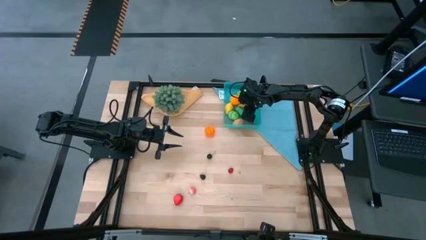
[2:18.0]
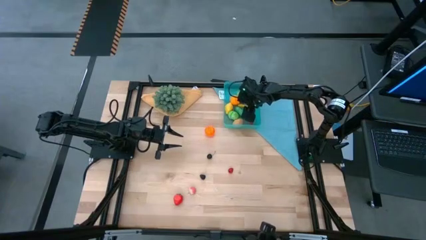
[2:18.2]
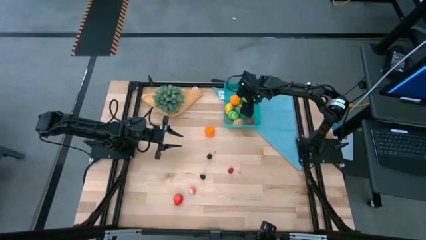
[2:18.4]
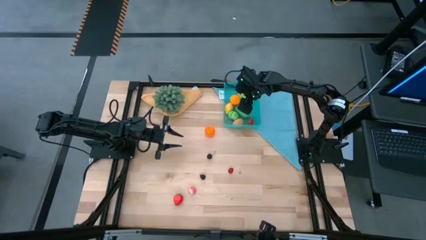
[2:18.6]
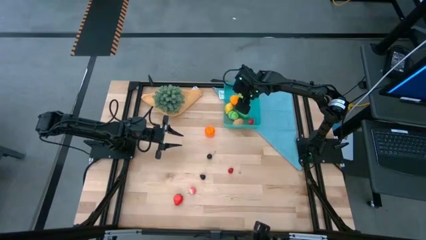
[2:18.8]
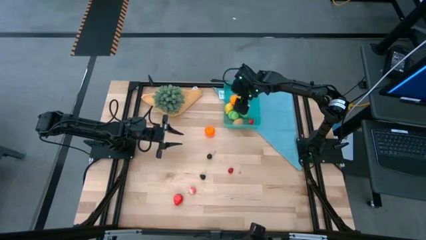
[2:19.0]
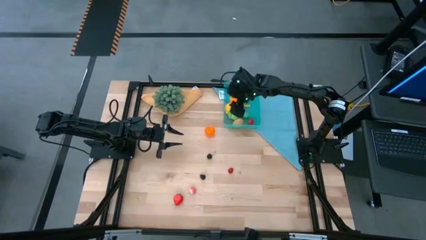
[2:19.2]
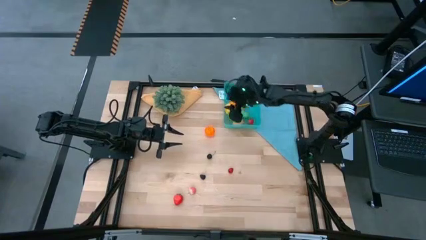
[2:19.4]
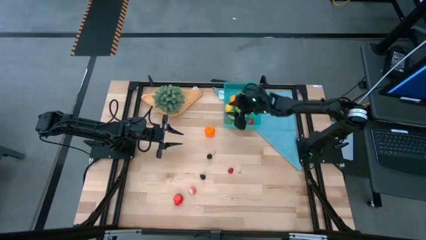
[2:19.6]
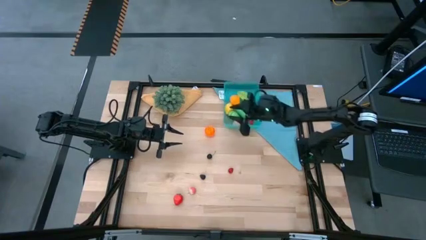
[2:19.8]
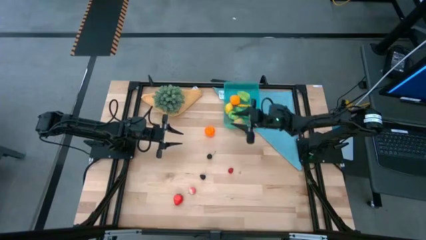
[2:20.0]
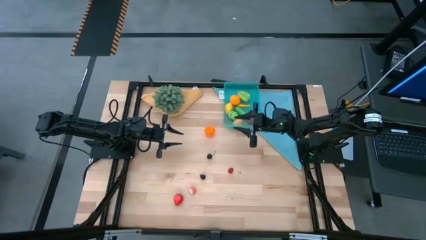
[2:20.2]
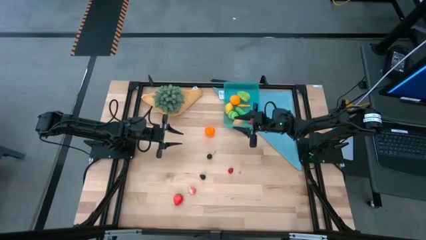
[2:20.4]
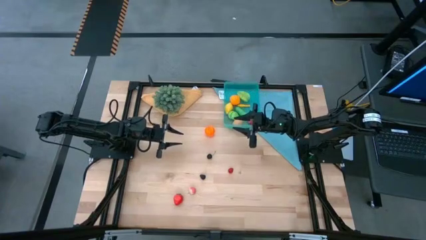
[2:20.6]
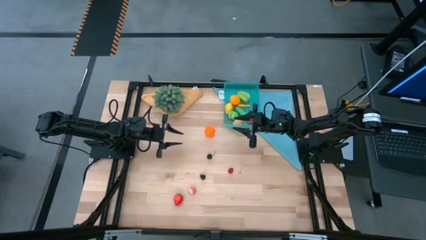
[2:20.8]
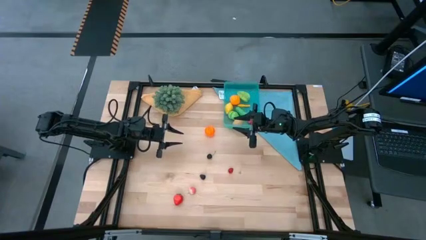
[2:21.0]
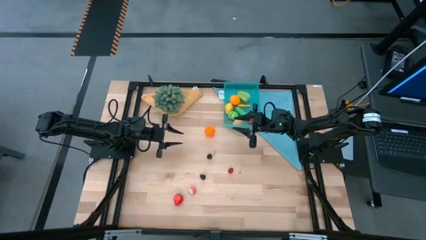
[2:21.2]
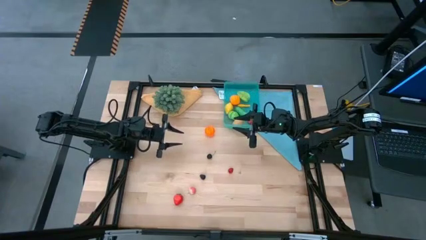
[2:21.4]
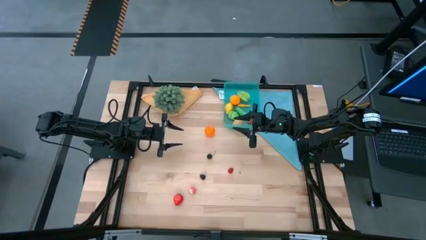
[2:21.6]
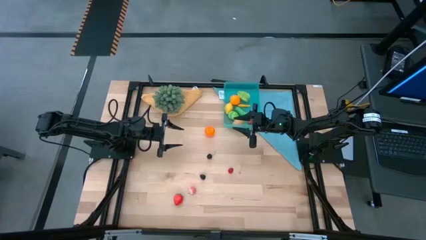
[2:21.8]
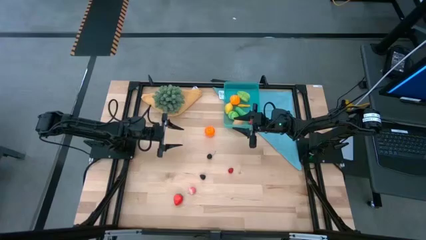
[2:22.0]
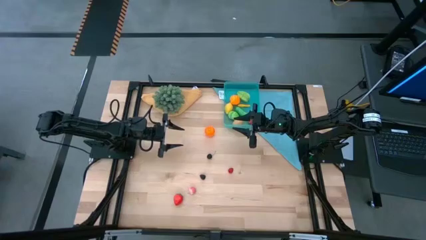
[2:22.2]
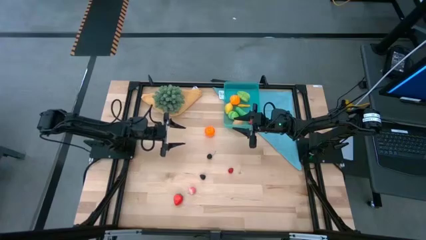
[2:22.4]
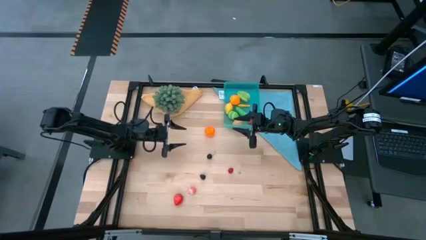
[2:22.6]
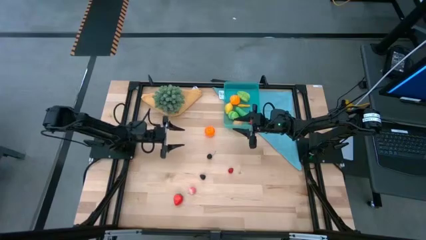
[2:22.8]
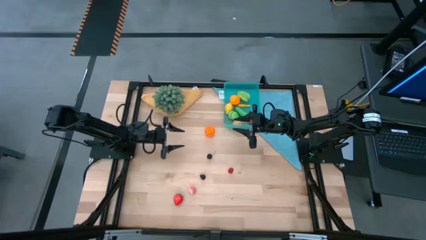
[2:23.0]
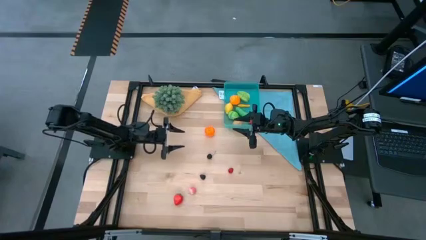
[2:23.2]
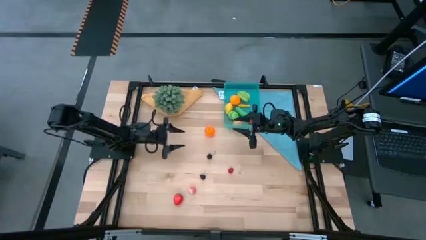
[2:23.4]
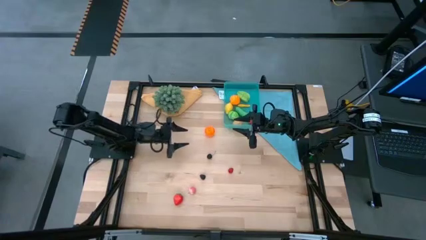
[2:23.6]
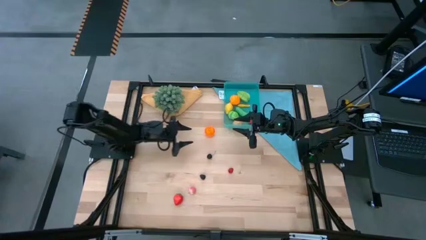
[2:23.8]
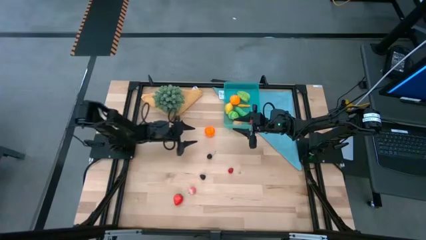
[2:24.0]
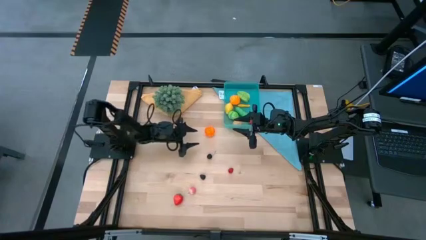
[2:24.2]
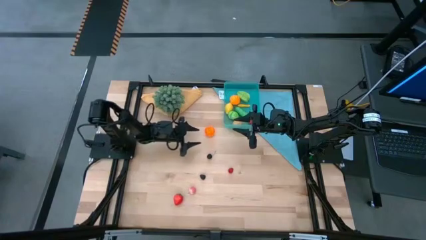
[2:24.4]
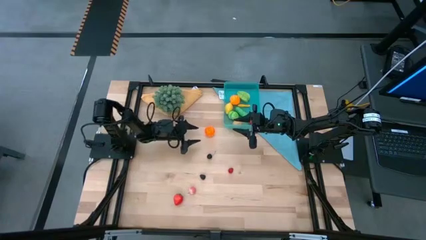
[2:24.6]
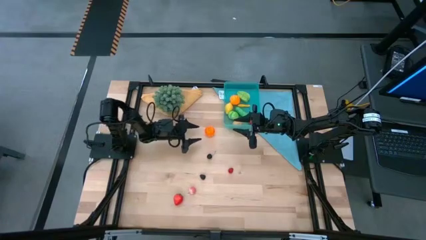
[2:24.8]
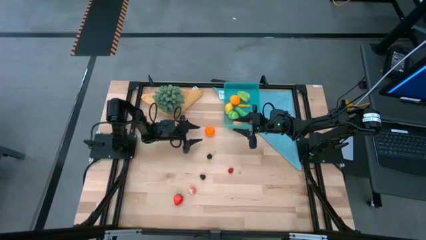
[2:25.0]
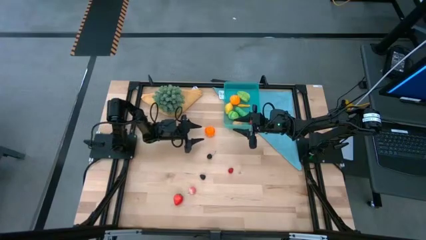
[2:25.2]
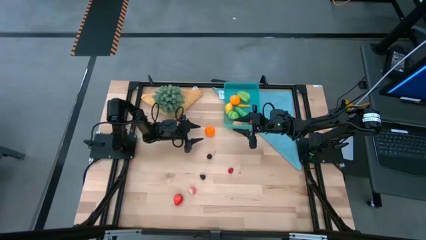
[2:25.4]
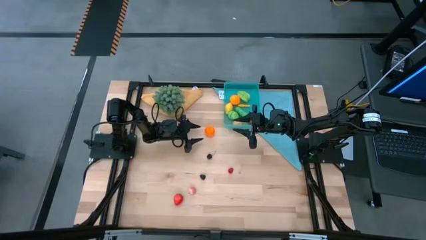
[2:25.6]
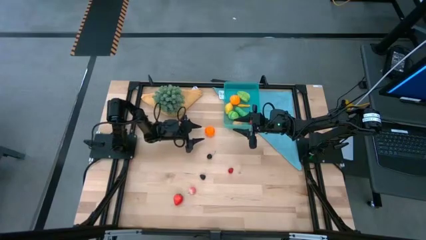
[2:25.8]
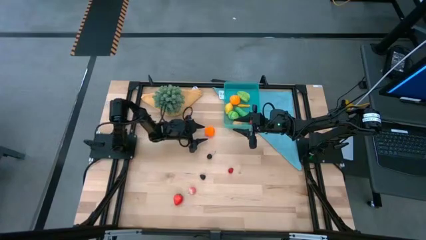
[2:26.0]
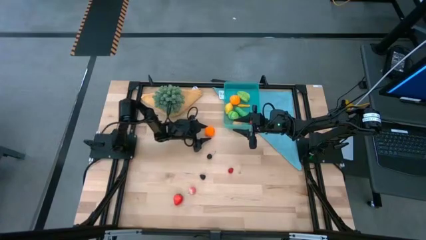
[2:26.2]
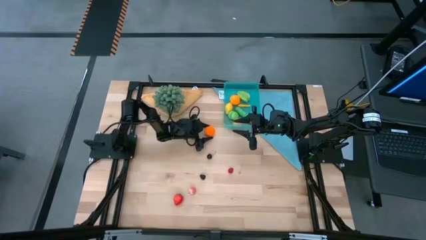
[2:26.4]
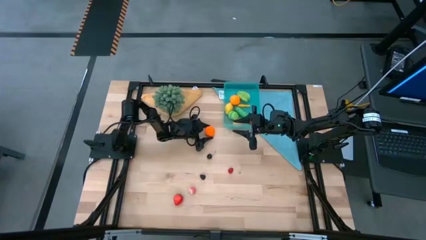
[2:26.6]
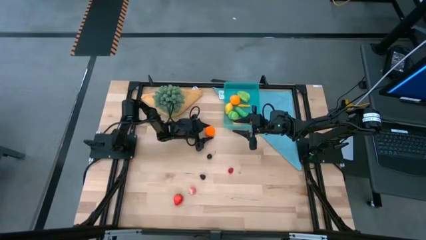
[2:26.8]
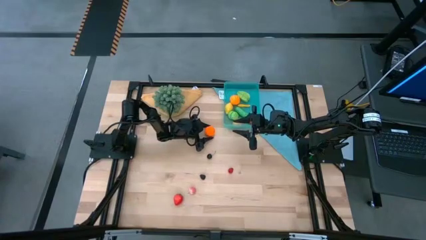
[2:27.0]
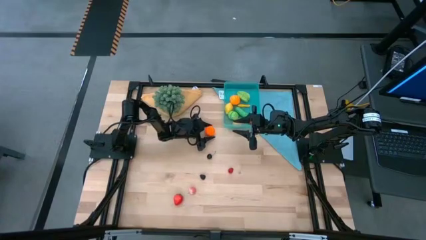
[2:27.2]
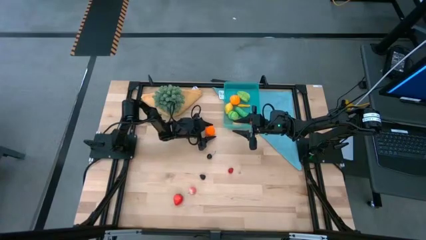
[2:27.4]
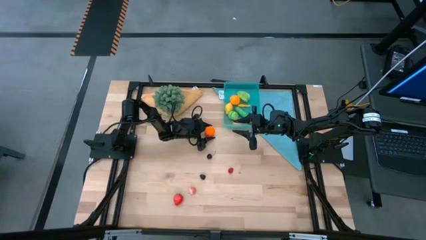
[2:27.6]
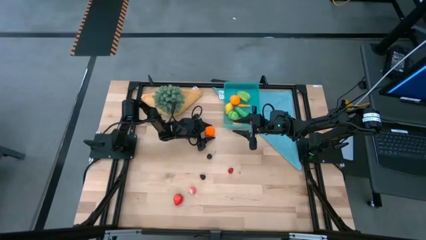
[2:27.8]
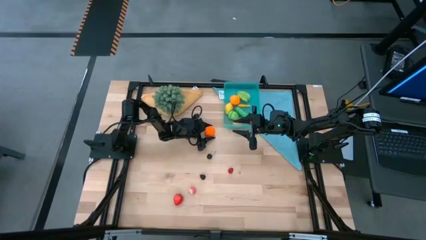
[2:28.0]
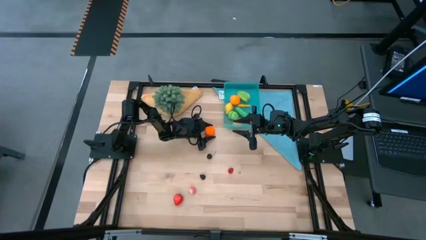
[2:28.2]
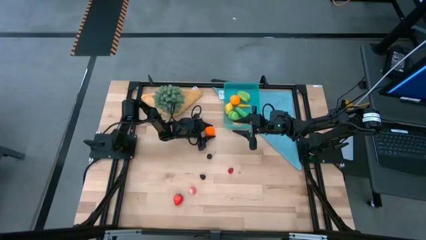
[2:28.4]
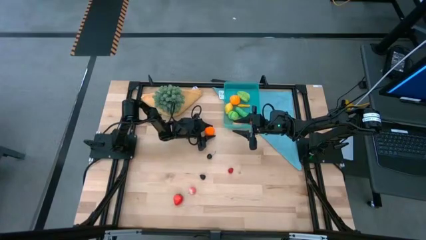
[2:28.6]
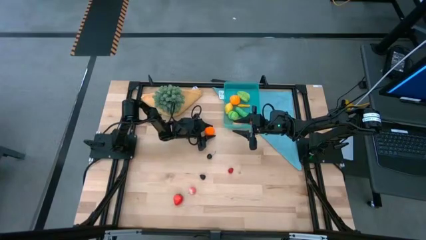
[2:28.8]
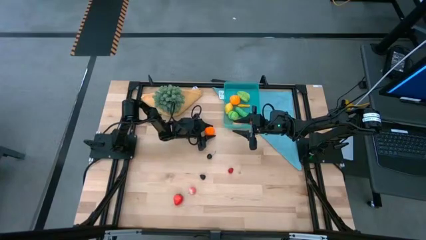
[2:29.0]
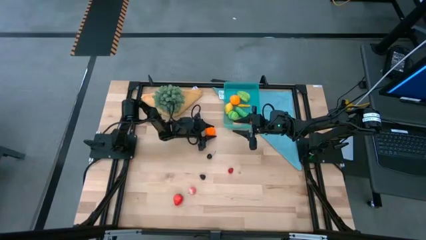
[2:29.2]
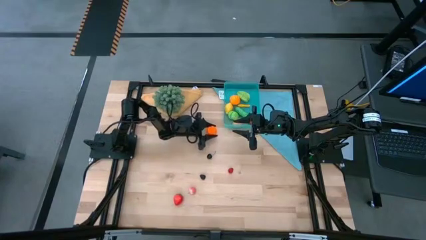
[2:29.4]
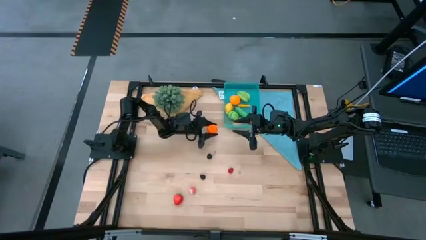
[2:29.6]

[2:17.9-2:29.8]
Task: Pick and placing Produce into tupperware
Put the orange tangerine into the blue bin

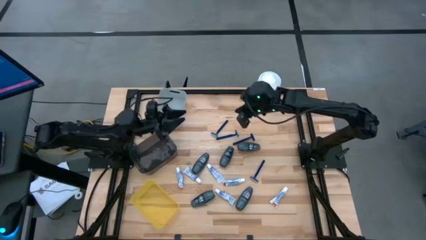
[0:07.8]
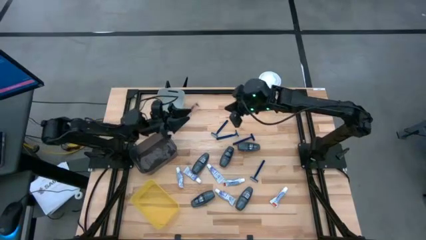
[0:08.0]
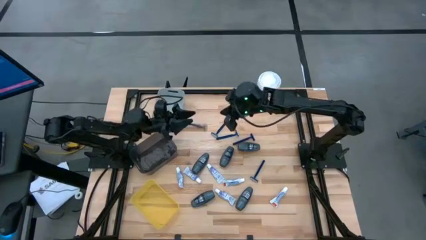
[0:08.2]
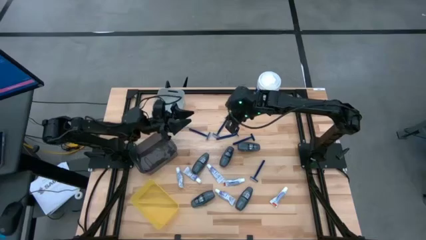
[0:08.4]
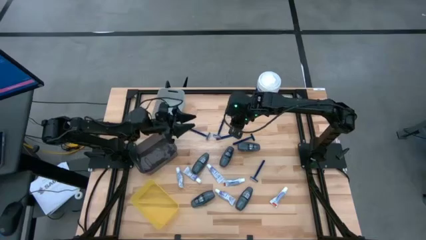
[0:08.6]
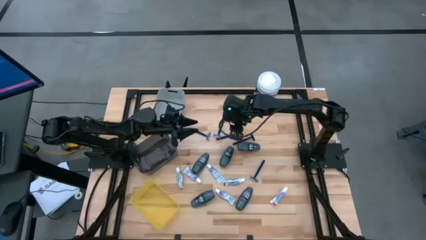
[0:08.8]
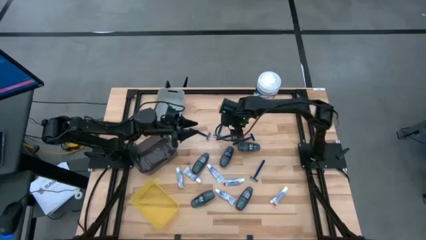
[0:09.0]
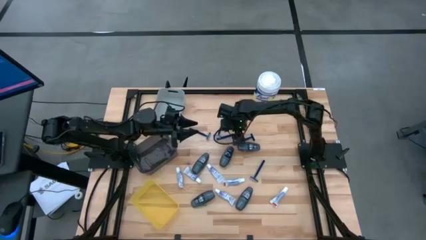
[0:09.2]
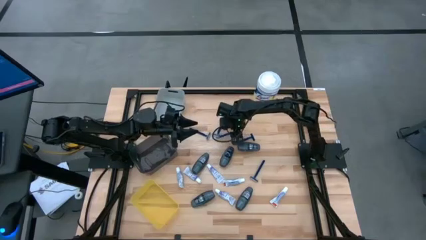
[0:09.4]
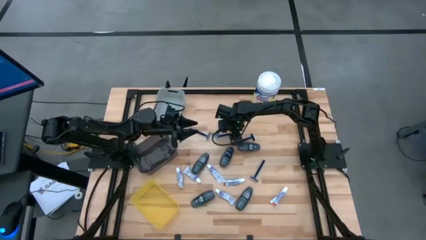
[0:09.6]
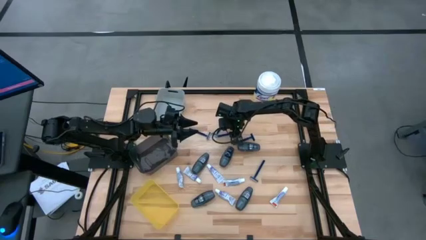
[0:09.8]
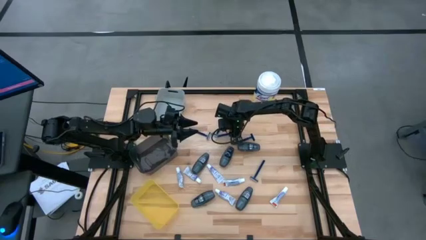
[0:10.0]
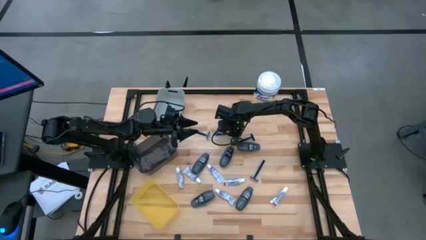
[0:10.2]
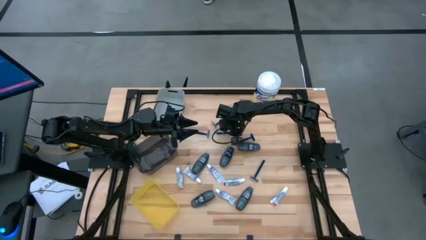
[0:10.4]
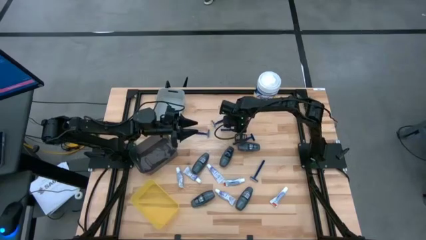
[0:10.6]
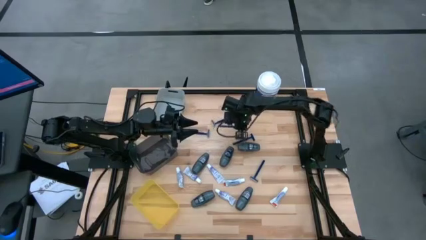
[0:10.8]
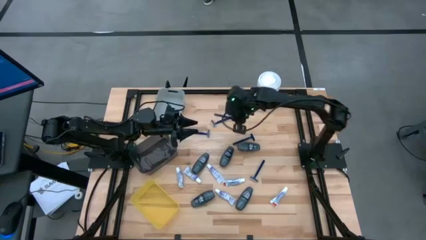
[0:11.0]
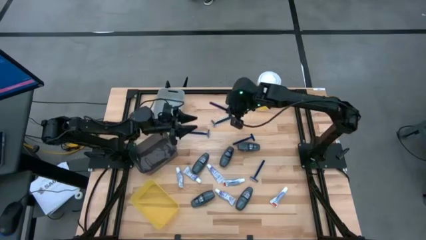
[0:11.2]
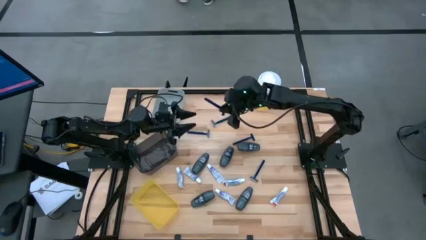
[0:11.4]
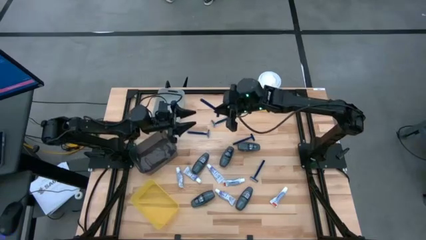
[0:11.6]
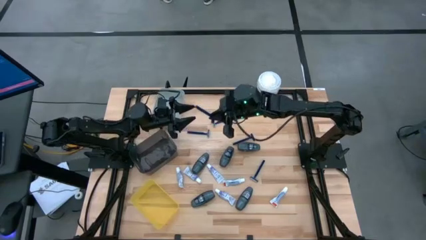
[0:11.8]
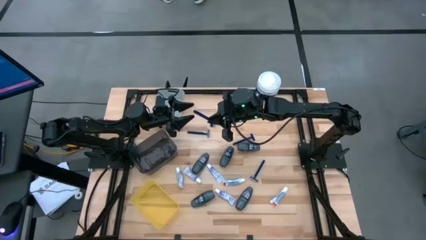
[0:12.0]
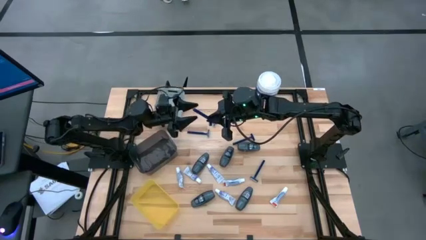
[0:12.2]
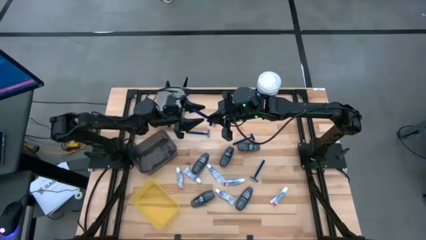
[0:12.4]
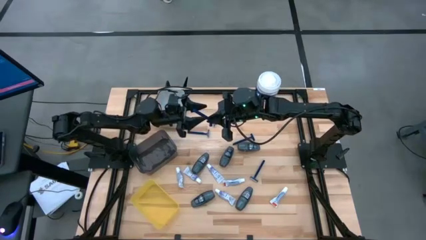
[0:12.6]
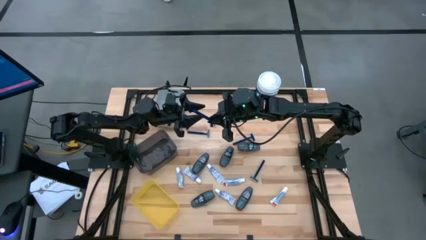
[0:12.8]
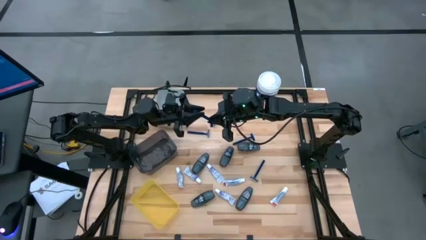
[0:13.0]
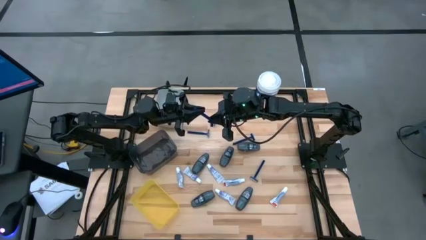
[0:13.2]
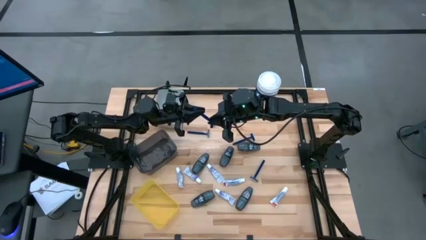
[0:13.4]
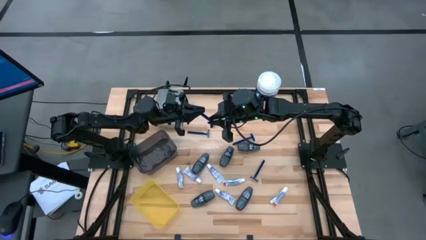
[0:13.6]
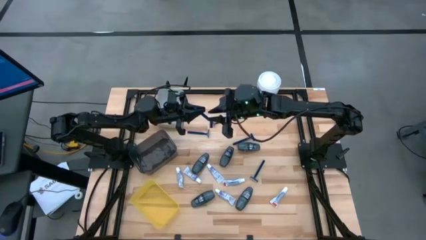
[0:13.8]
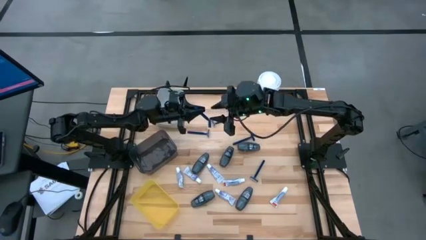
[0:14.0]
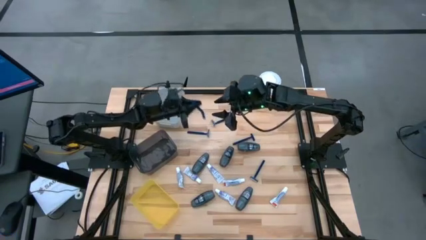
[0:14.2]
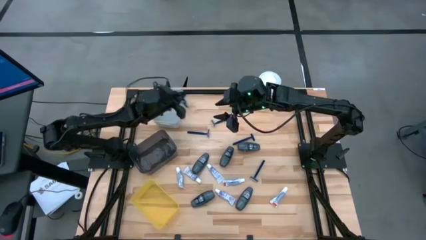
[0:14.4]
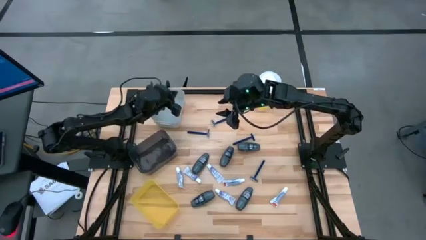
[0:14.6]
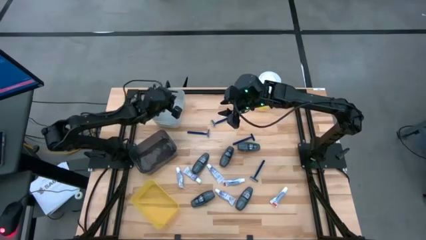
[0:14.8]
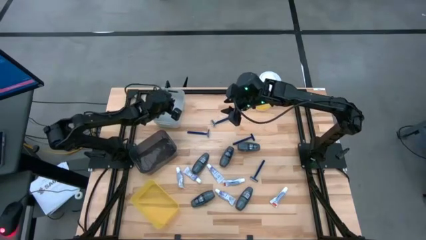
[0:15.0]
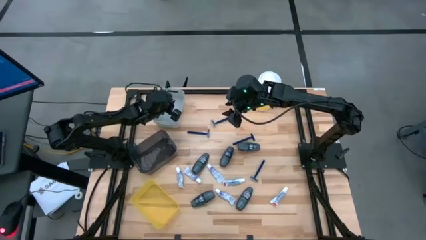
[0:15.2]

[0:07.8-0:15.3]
Task: Pick & Place Travel size toiletries
Put the razor into the gray bin
